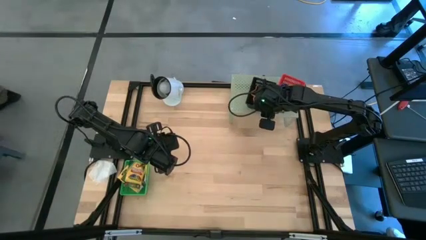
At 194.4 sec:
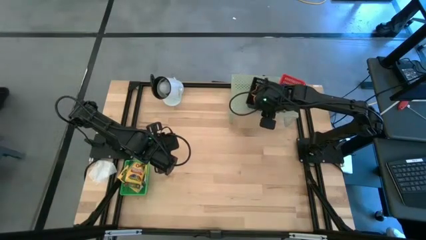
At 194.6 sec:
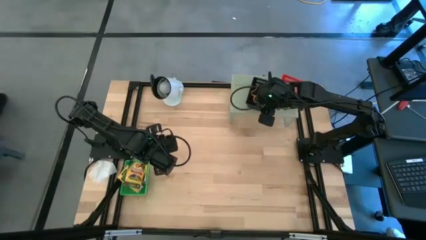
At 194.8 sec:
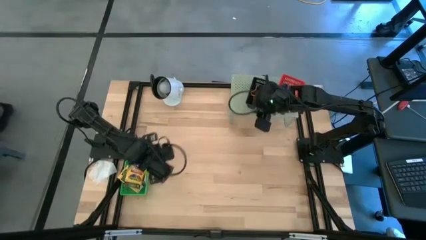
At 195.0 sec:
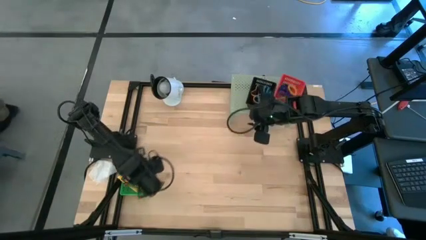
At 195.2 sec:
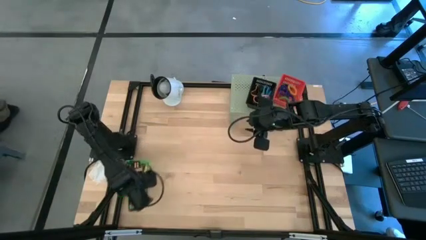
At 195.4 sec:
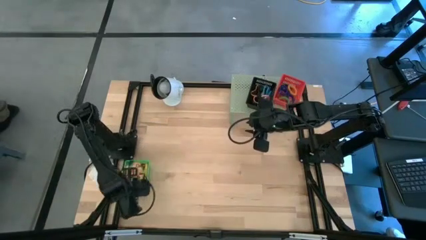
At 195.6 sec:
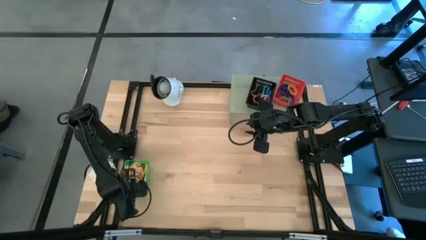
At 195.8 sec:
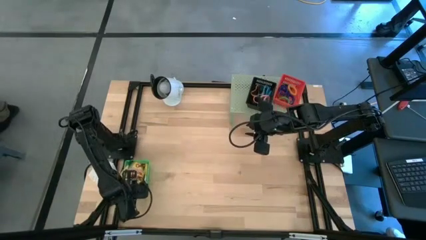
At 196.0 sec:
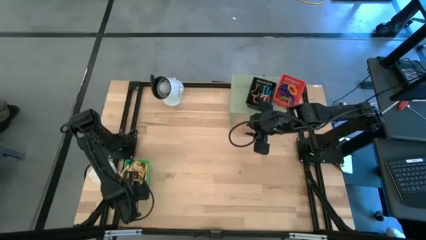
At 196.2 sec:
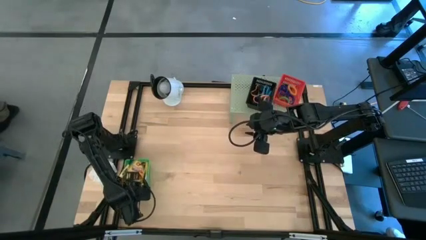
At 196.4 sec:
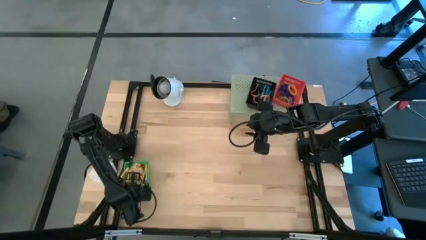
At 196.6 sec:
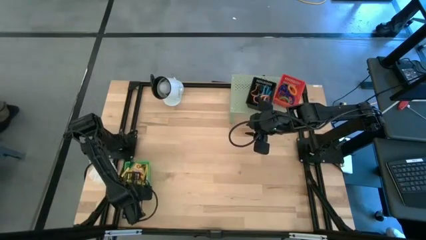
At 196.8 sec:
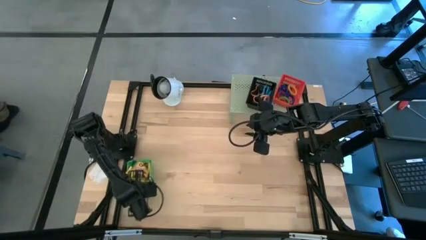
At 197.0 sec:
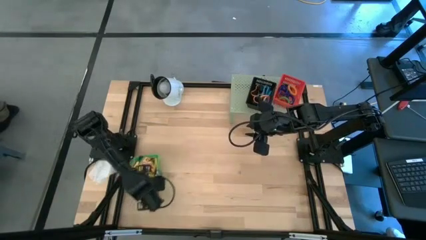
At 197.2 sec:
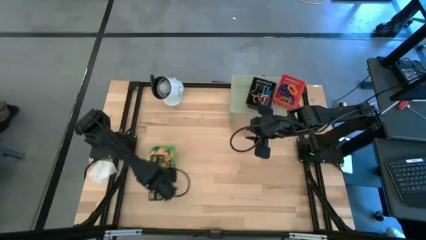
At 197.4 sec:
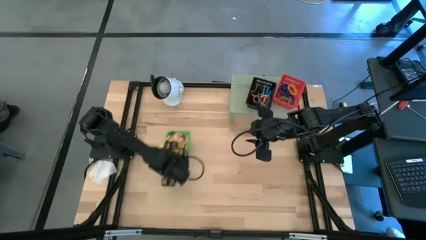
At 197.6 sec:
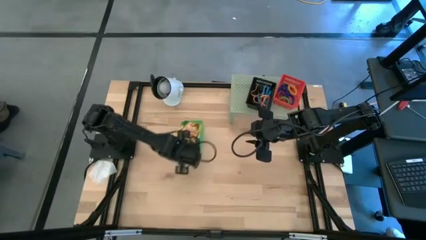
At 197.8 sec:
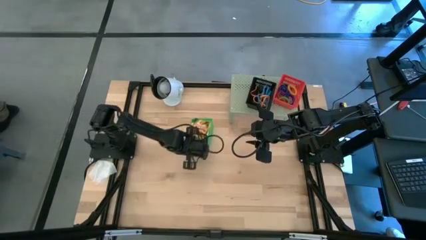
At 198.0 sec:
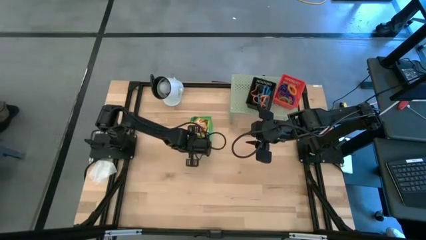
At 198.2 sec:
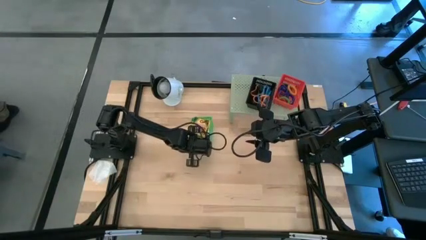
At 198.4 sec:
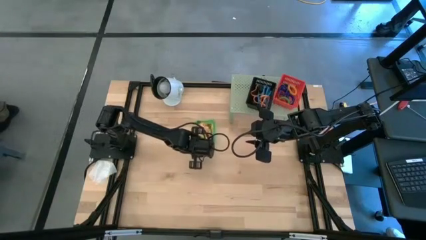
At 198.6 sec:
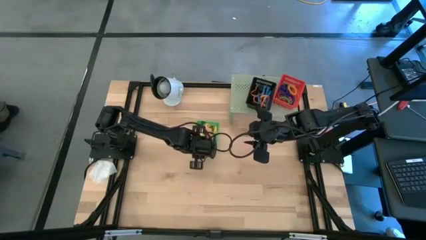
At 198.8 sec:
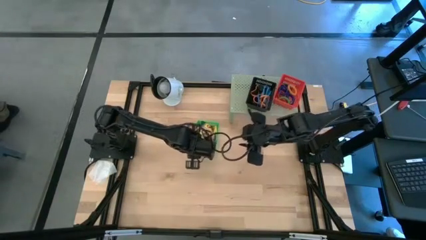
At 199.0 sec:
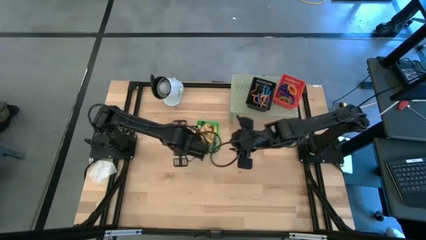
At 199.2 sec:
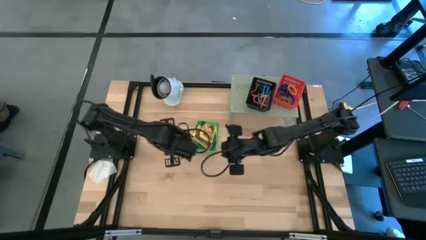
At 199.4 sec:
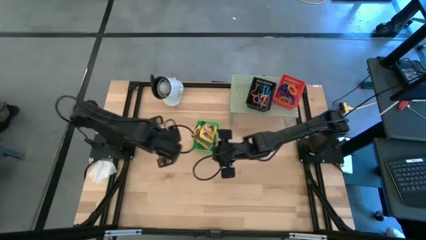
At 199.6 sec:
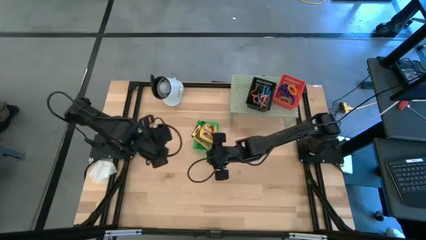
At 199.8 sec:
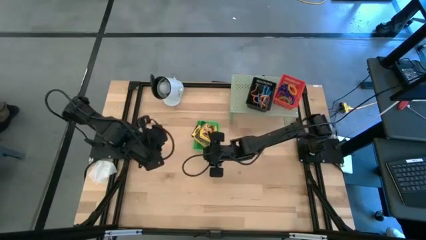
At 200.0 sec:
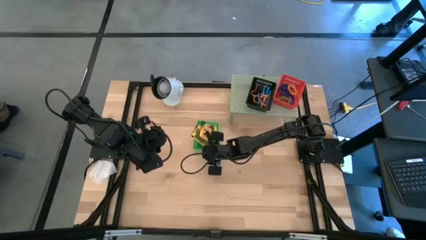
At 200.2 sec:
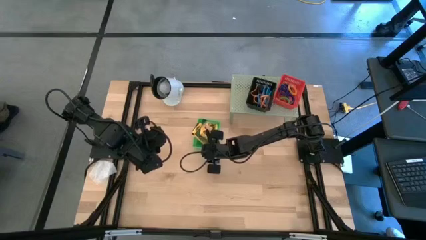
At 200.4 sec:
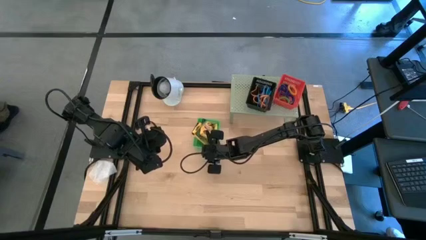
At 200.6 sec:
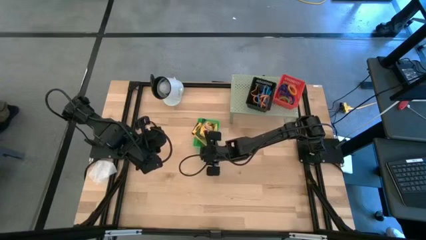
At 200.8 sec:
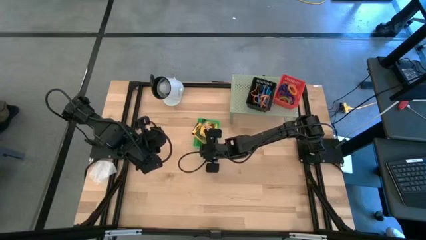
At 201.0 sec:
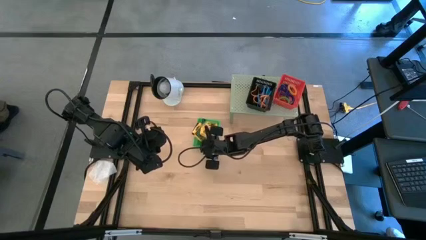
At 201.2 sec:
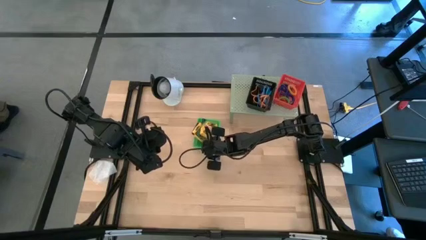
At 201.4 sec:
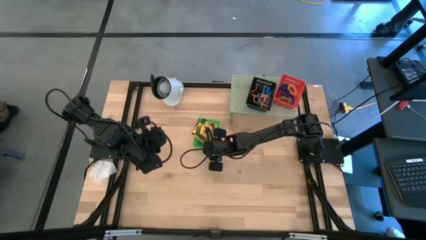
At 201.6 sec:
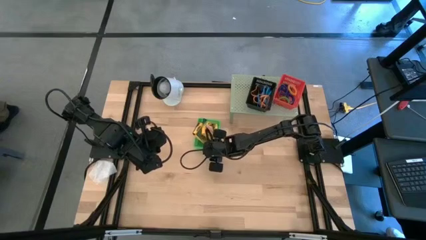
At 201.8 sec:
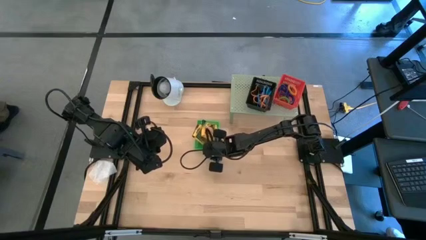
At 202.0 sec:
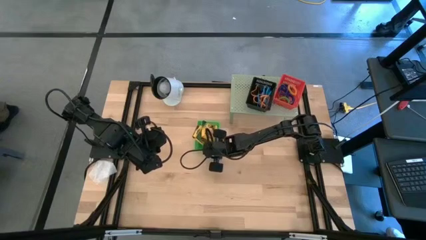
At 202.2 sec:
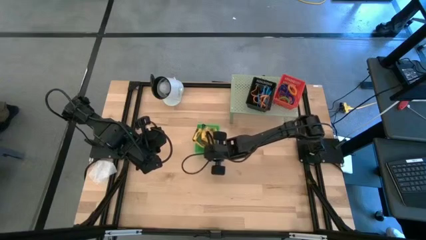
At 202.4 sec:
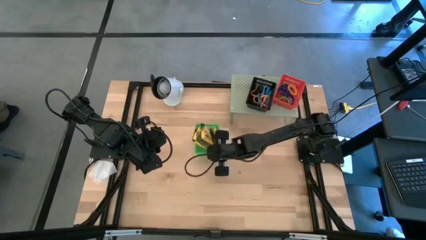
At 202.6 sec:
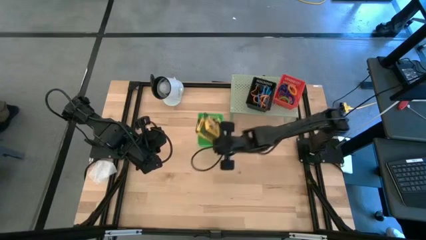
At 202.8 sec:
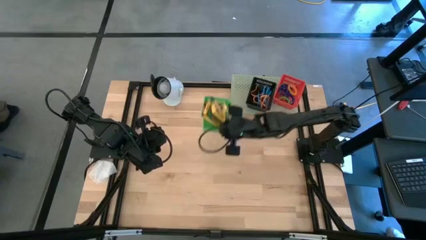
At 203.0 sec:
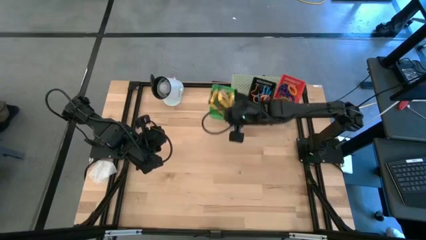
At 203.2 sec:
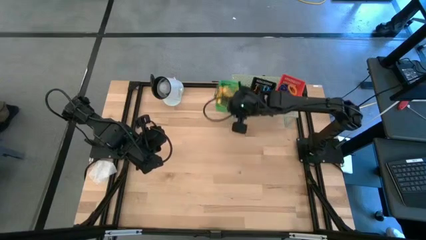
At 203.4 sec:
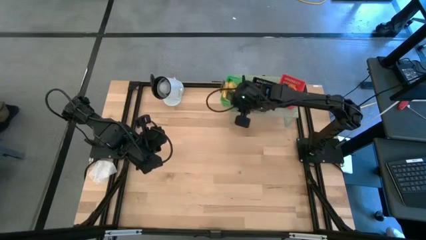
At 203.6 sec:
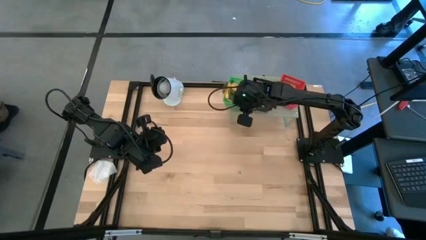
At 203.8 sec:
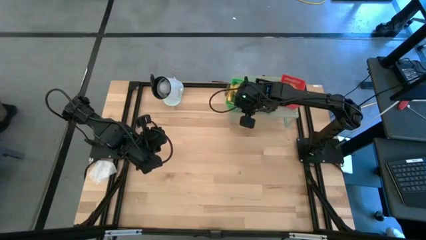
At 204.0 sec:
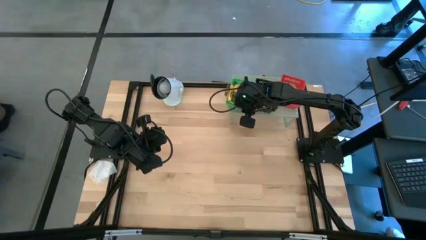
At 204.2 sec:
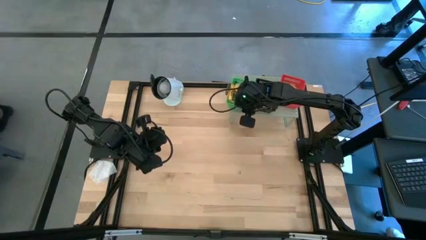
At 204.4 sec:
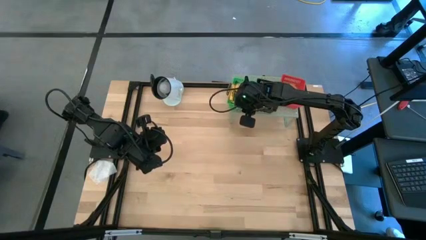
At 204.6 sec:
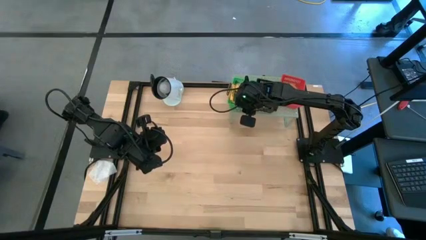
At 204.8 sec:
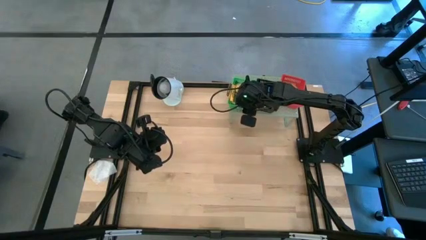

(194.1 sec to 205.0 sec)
Task: Pick & Place Office Desk Supplies
Put the green bin on the shelf

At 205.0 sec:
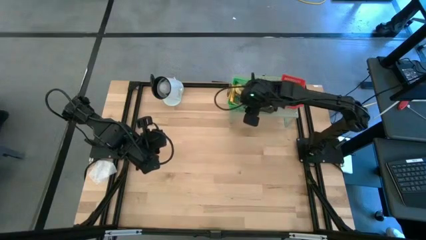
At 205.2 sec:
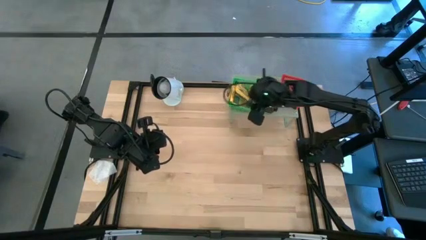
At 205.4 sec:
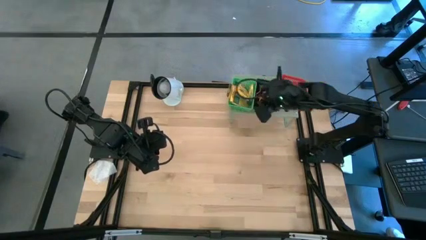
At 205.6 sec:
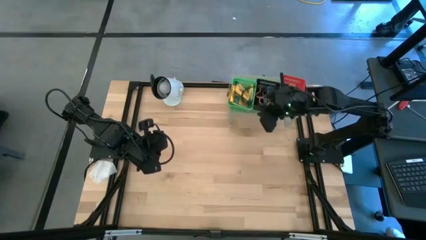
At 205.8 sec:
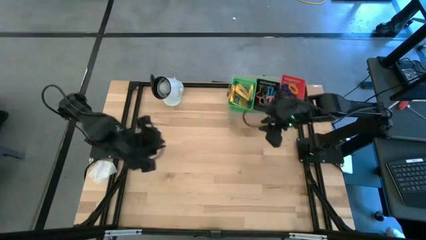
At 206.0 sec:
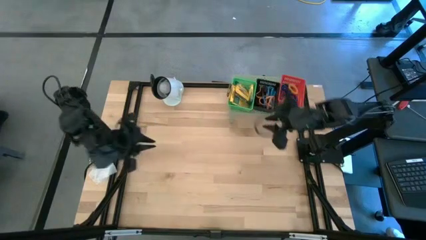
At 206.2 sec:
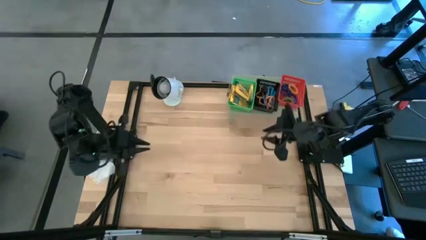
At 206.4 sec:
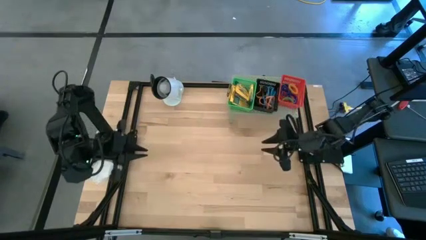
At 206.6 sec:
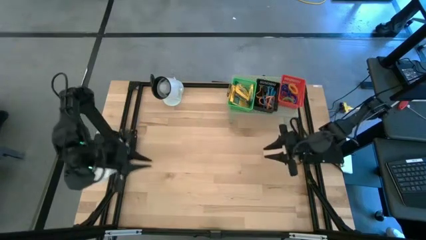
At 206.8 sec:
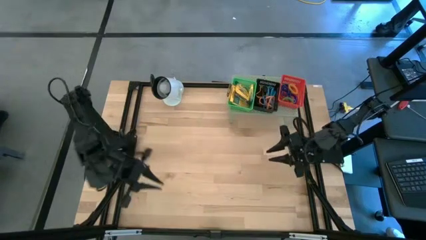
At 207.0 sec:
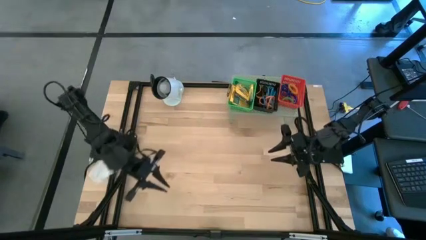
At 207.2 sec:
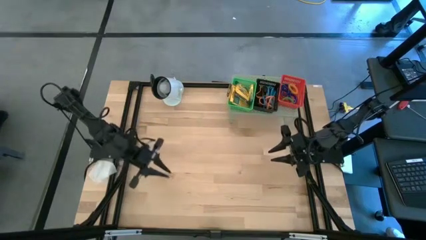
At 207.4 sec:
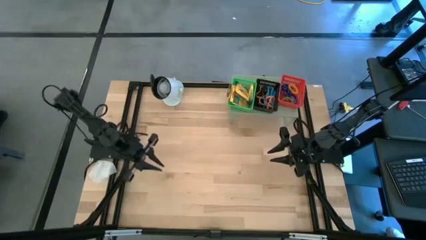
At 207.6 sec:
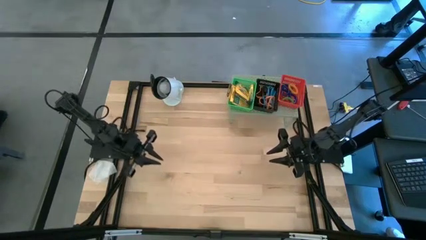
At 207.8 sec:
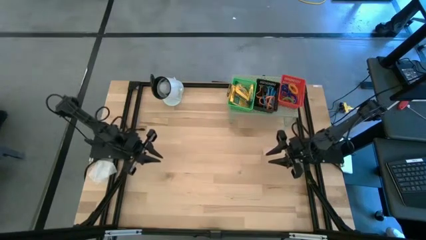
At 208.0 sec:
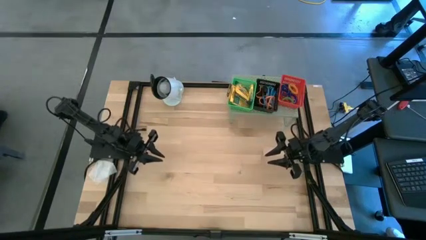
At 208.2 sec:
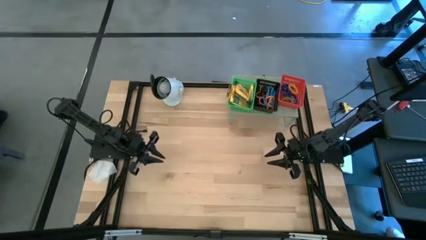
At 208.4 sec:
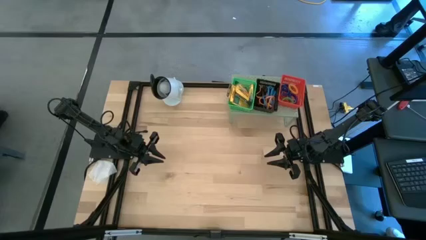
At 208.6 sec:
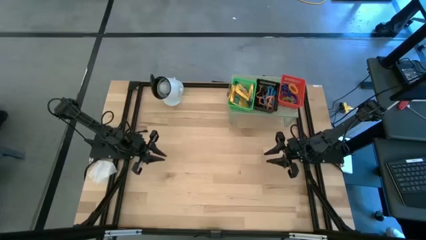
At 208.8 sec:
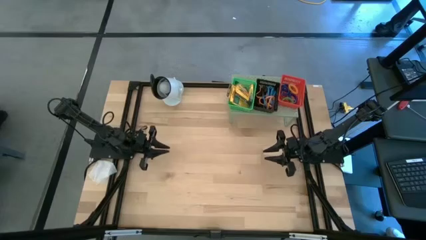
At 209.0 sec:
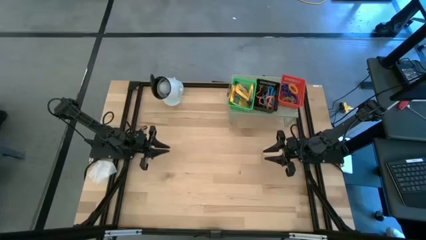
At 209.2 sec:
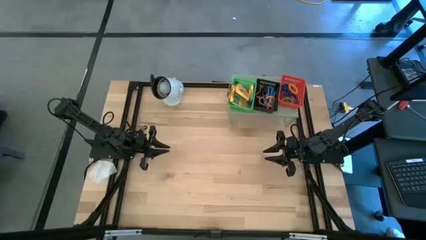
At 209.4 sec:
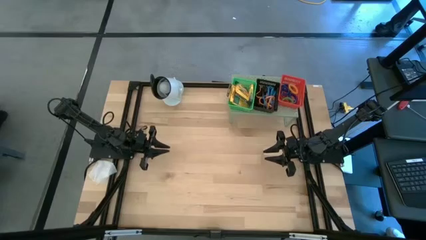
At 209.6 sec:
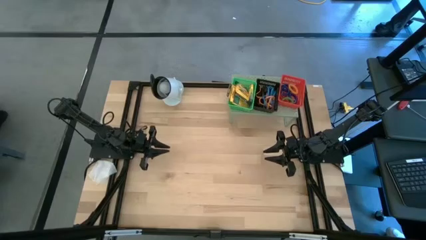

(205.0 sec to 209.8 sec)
Return to Home Position

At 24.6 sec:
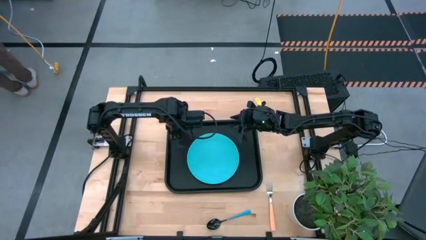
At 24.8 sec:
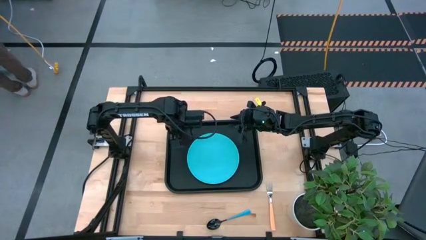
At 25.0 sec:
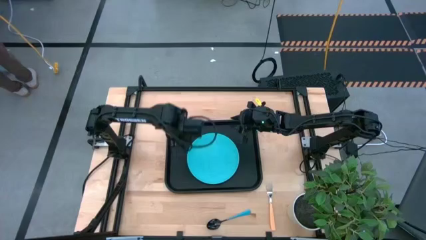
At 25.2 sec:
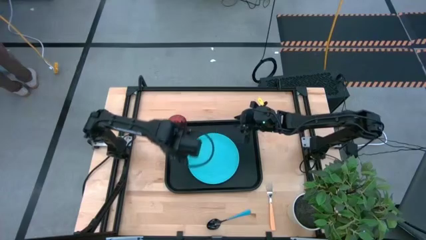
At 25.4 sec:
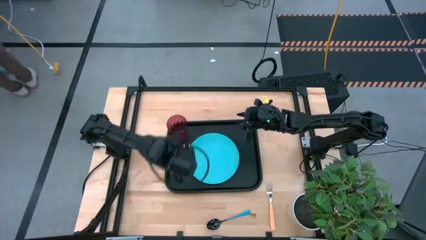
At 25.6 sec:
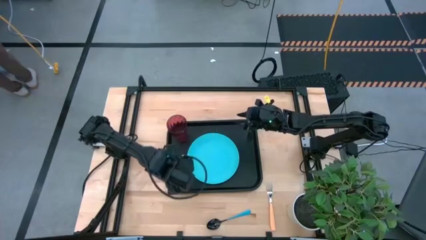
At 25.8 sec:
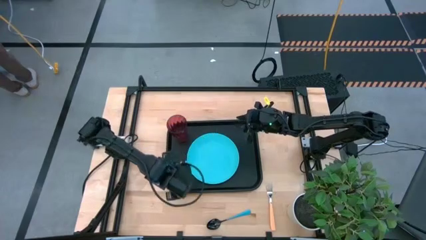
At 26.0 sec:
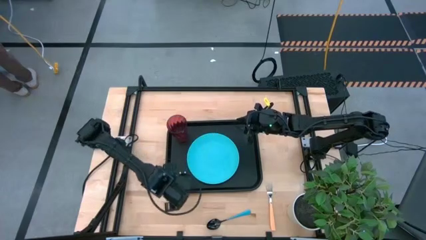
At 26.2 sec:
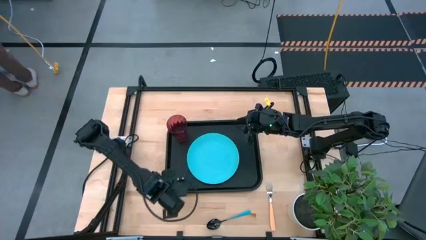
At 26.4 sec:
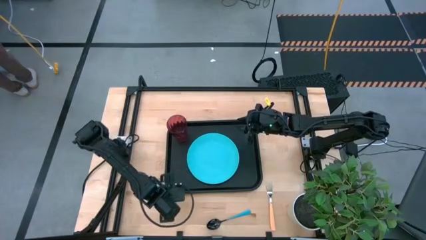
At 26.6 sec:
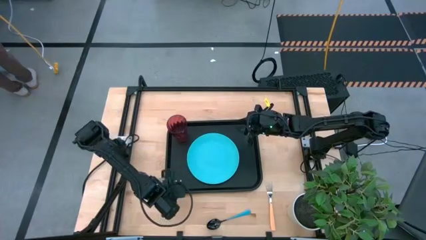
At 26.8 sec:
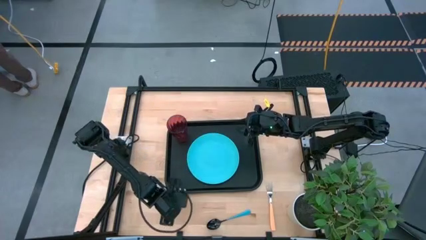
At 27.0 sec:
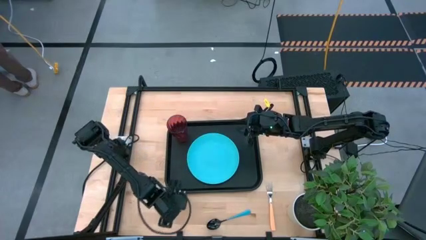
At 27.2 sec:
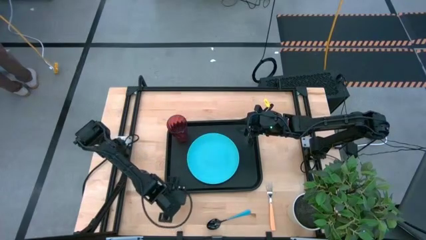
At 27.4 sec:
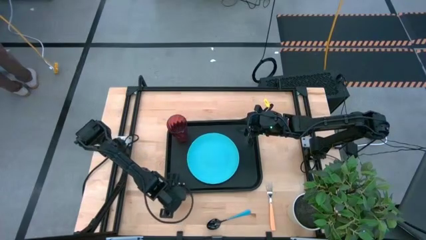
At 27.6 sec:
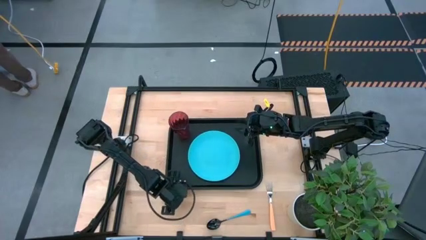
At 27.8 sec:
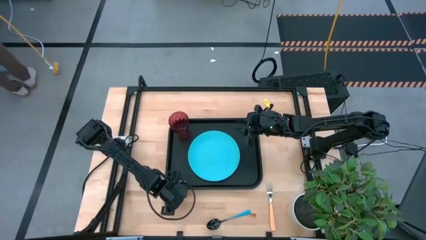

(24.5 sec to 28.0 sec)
Task: Pick and place plate/cup/fork/spoon on tray
Adjust the tray
